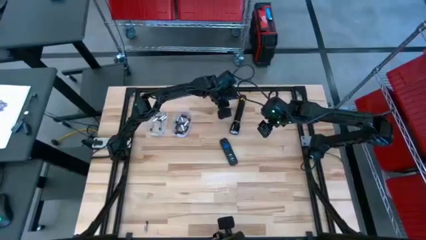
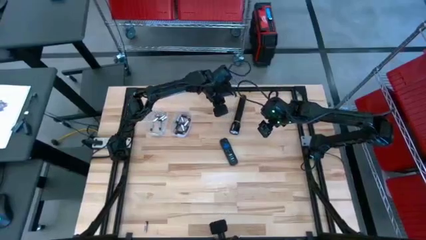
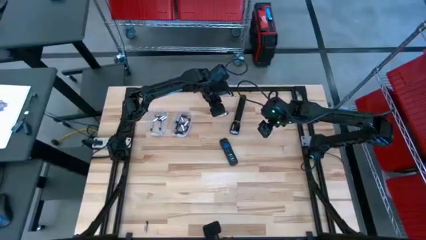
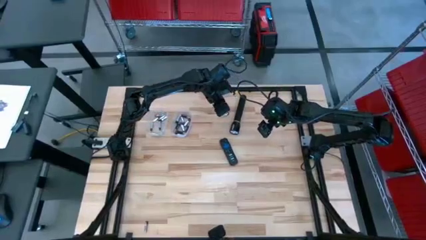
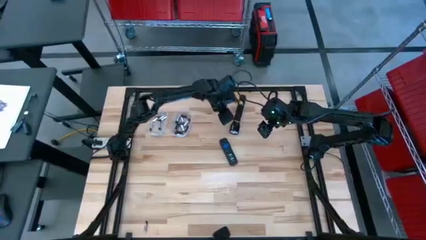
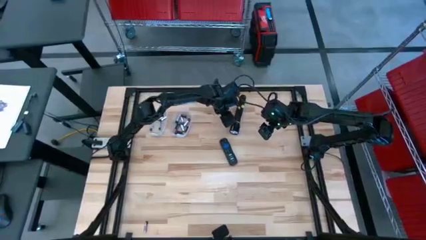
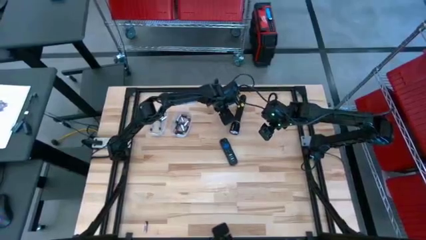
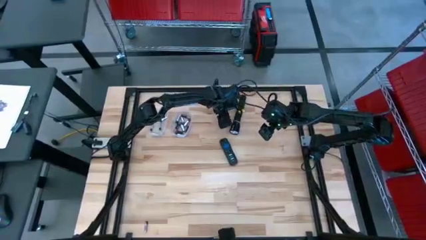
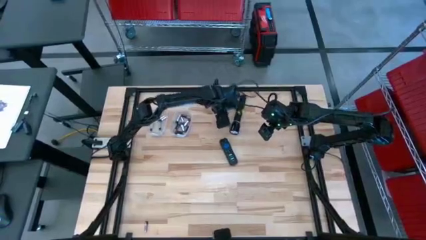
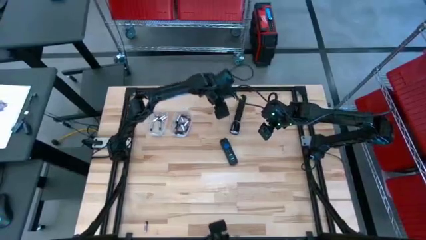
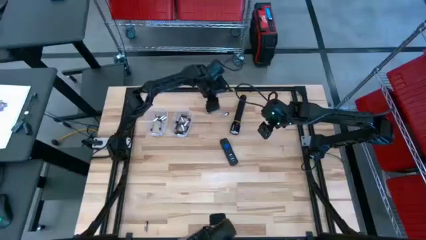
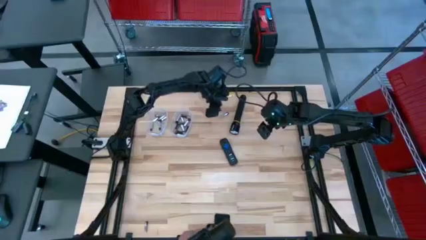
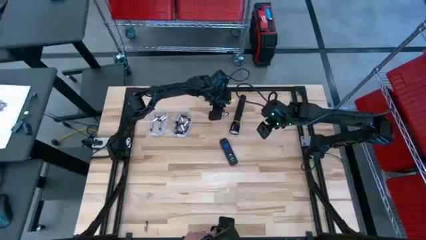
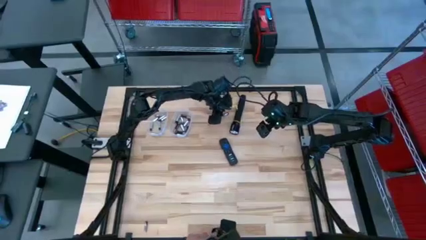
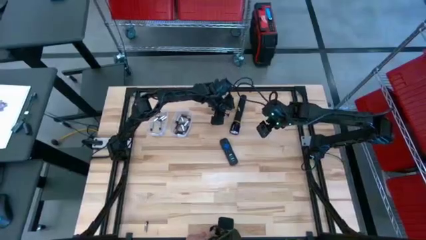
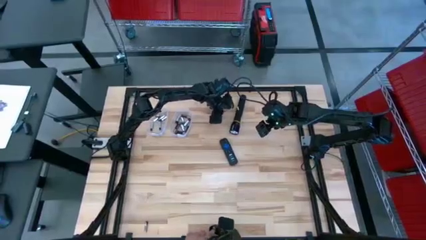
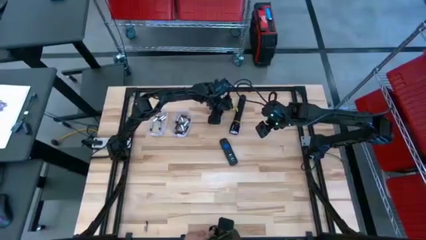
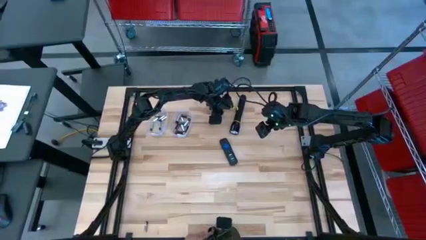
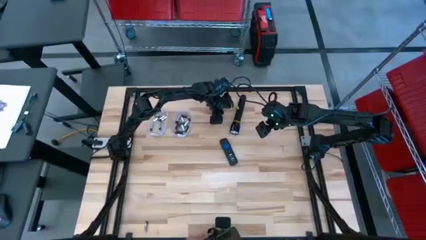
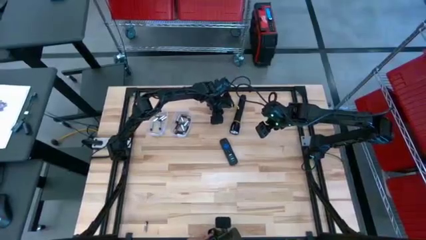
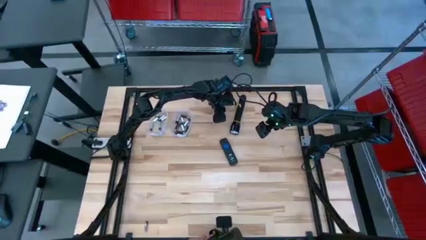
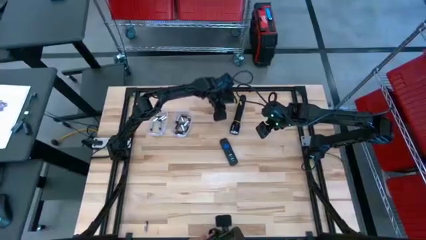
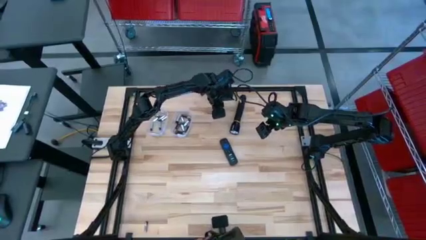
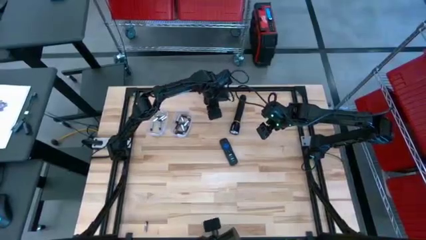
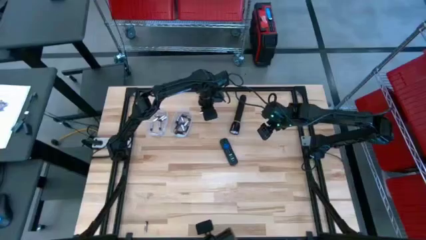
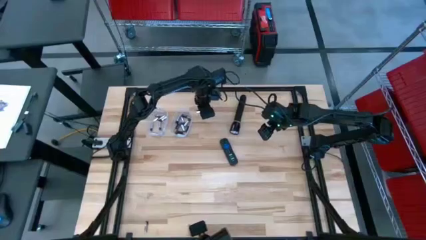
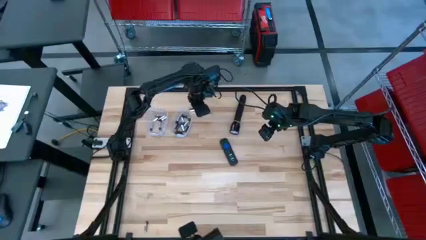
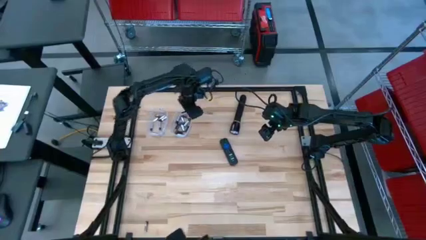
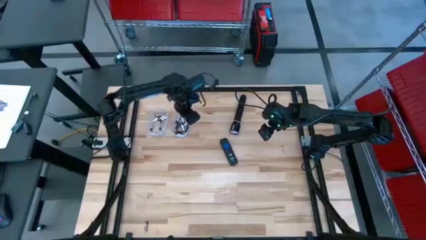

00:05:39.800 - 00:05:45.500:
Task: Insert battery
Put the top silver battery into the right transparent bin

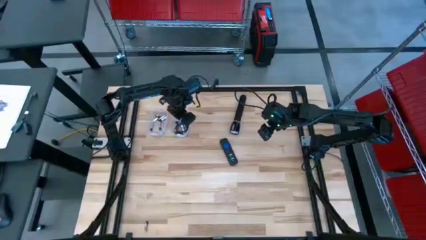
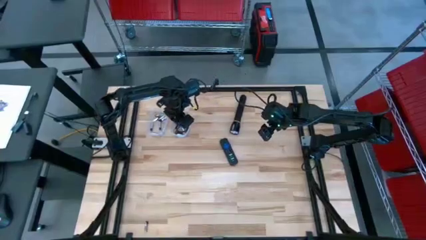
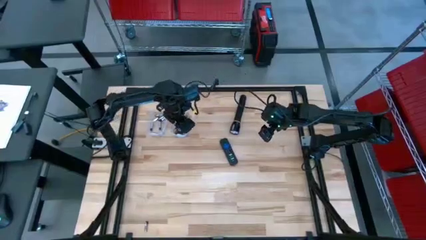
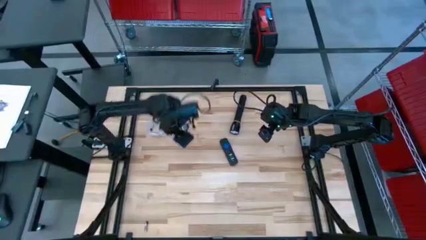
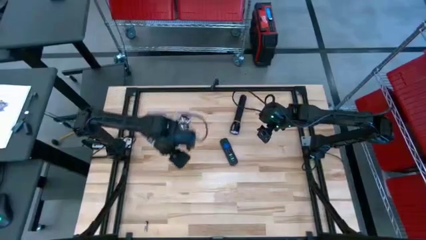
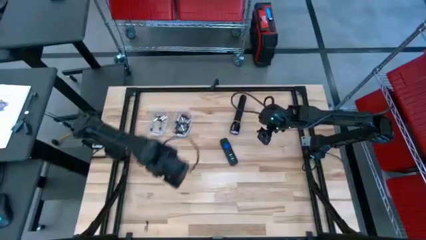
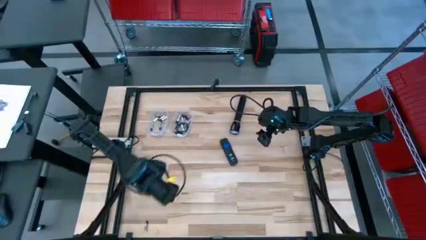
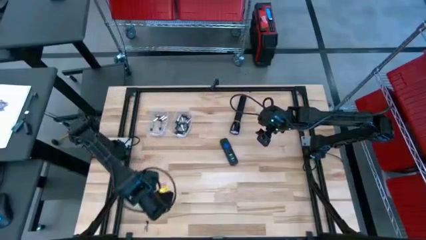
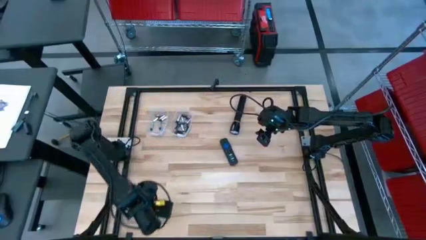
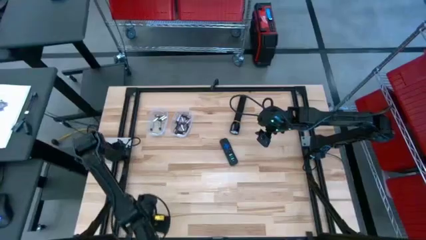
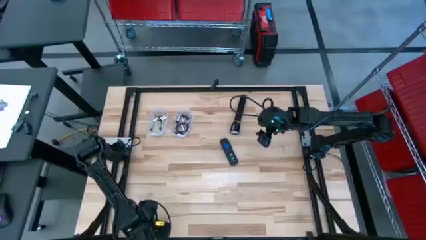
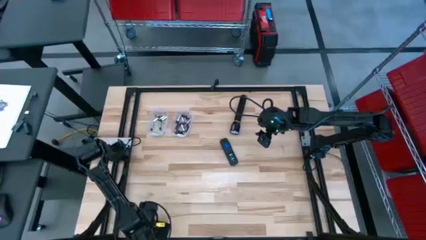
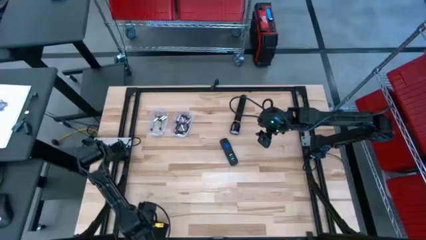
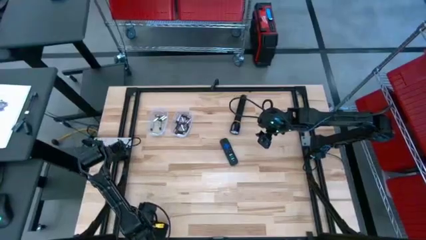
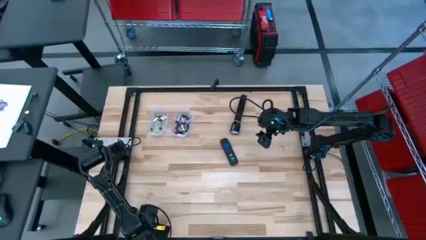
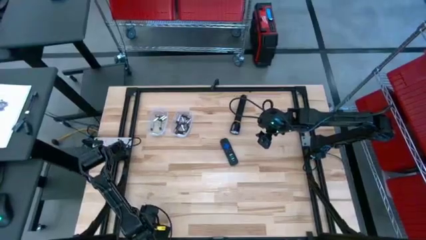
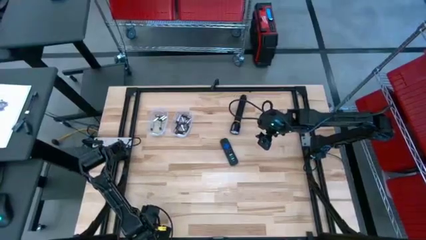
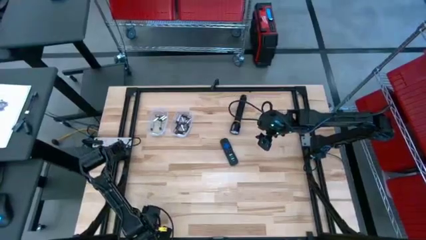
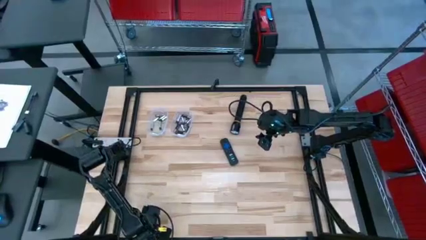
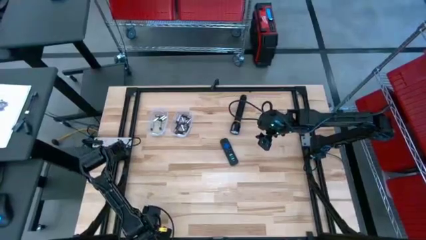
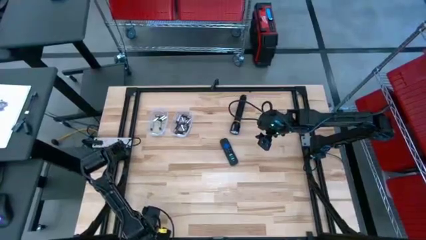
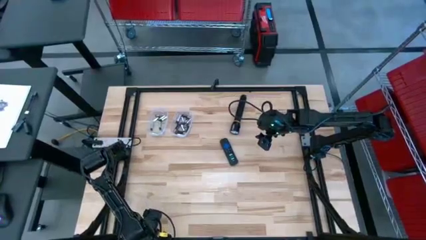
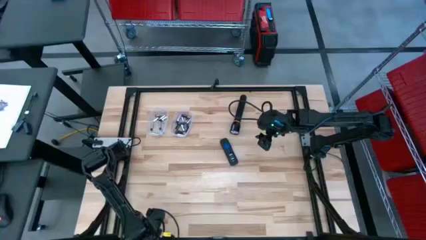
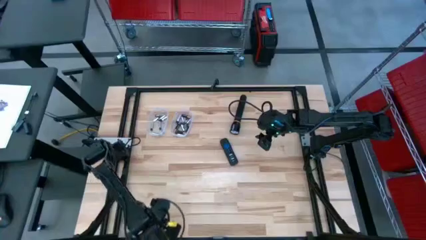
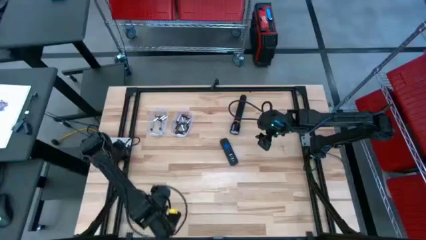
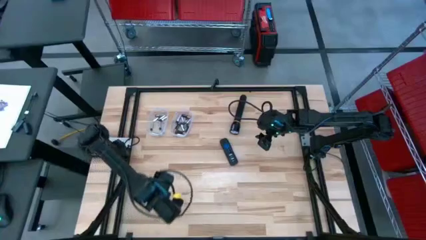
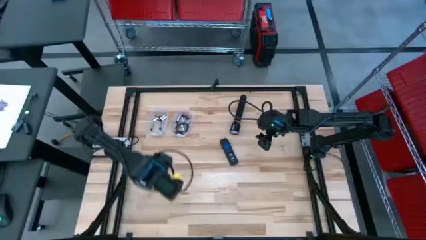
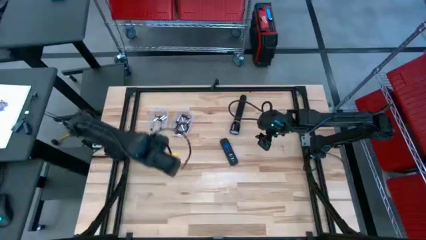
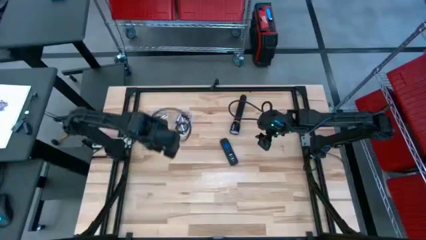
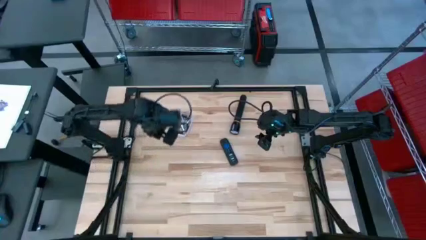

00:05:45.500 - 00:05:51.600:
Put the silver battery into the left transparent bin

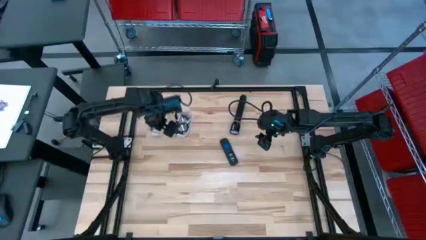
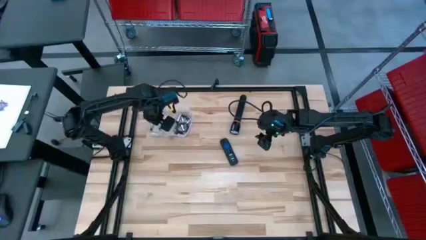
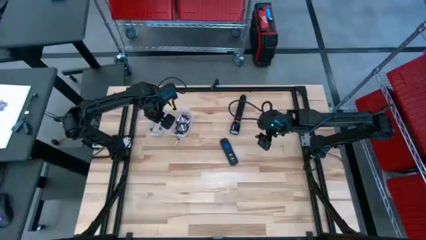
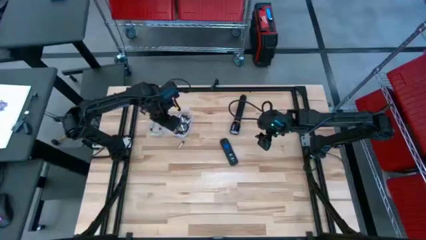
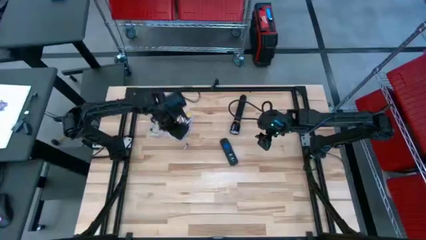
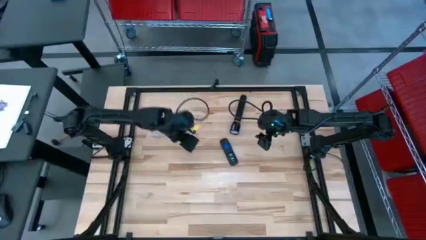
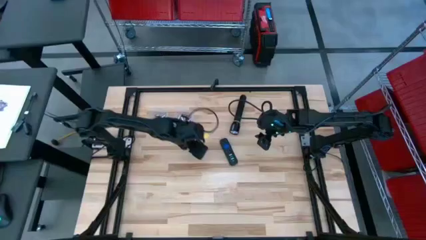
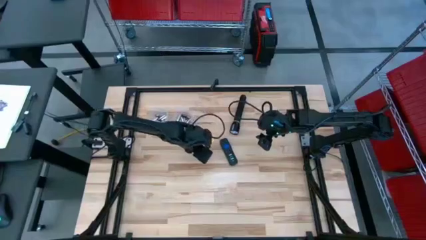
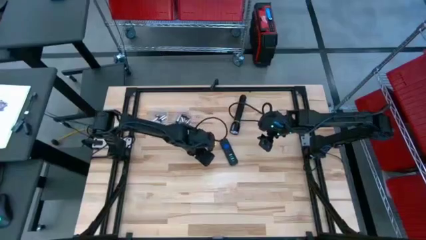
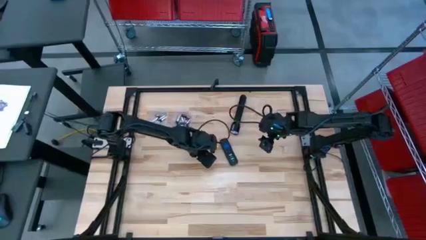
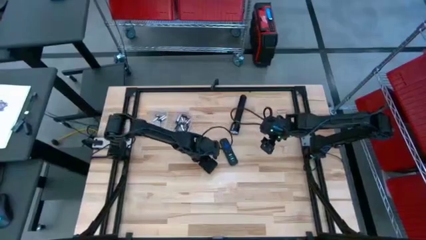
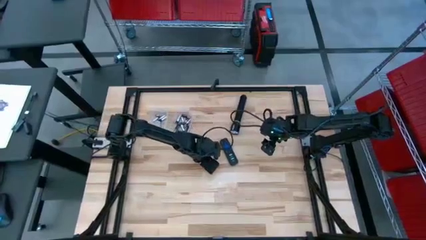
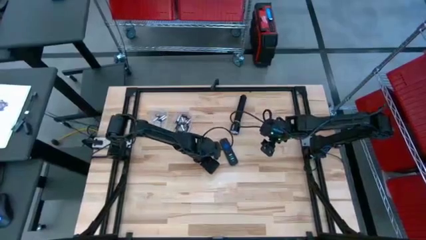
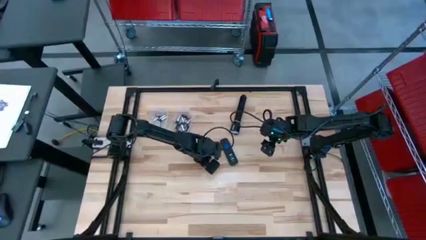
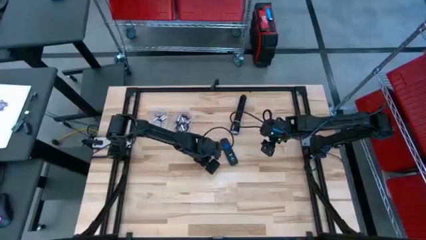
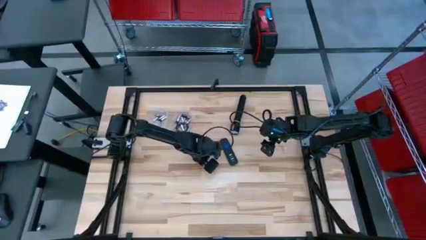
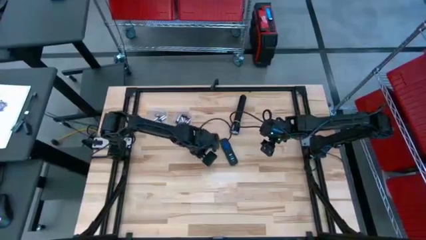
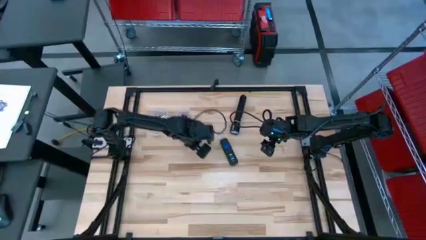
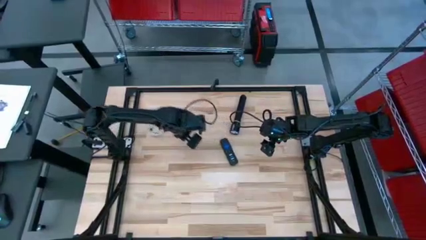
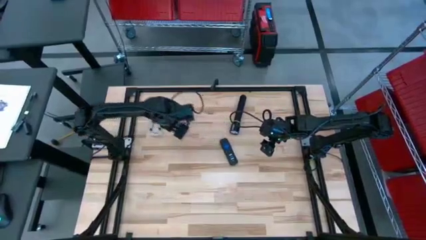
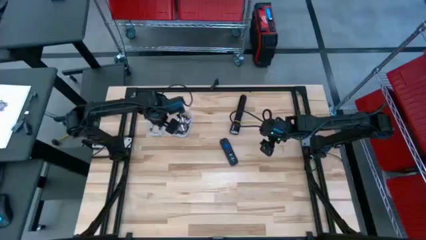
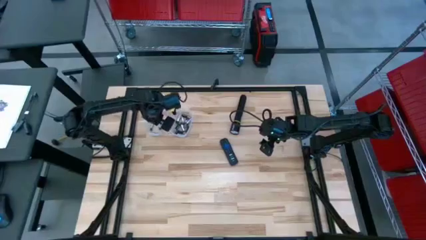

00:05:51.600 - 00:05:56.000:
Put the silver battery into the left transparent bin
